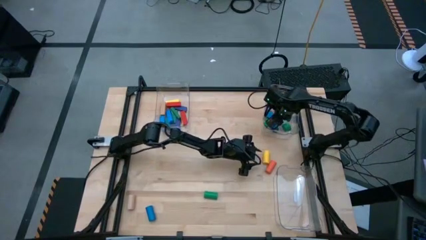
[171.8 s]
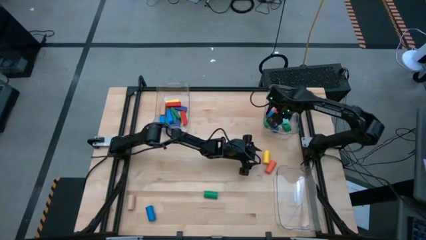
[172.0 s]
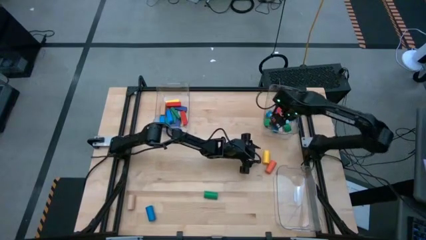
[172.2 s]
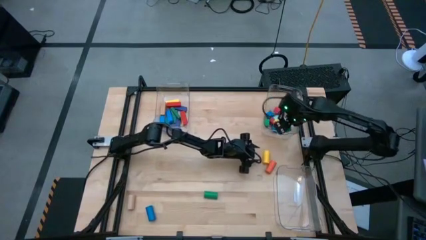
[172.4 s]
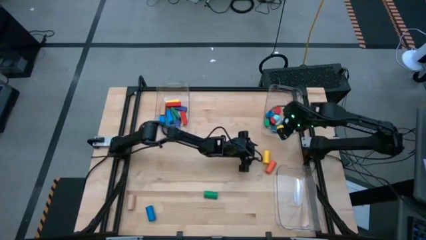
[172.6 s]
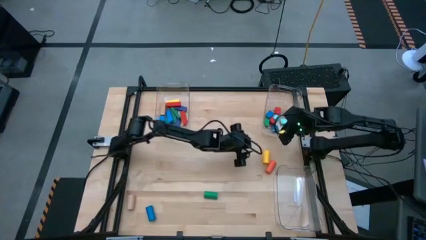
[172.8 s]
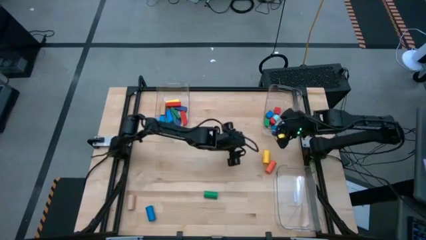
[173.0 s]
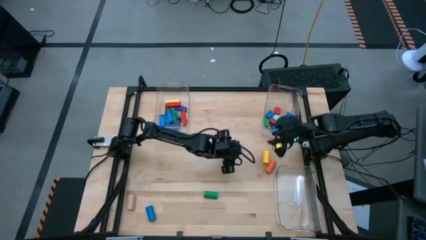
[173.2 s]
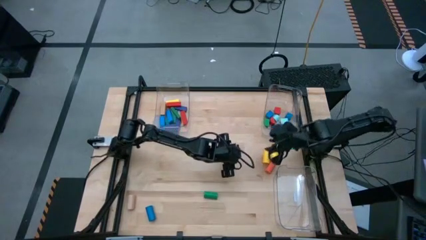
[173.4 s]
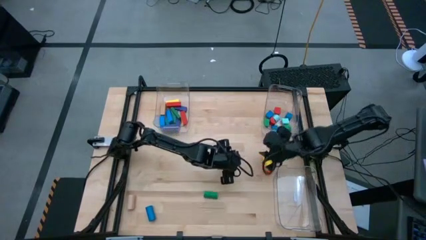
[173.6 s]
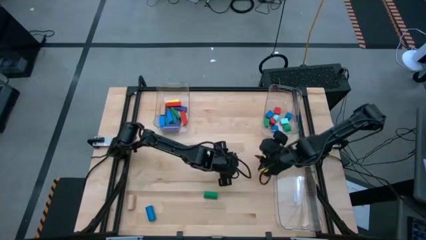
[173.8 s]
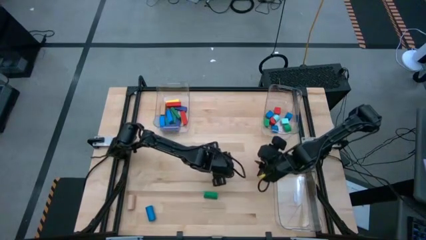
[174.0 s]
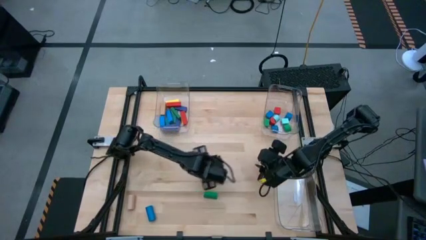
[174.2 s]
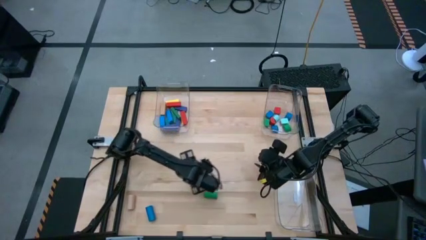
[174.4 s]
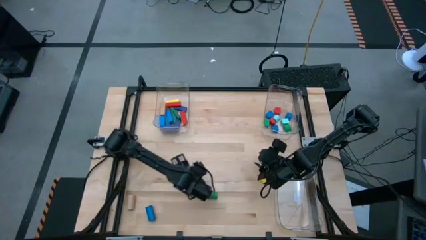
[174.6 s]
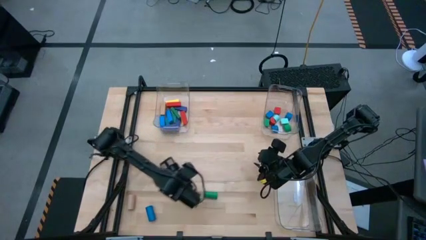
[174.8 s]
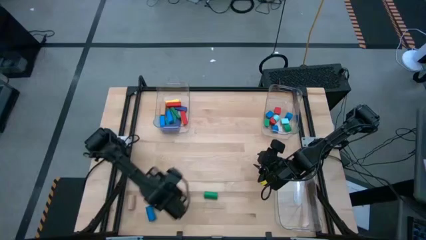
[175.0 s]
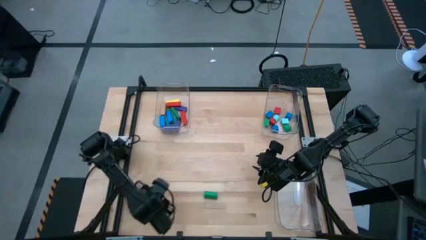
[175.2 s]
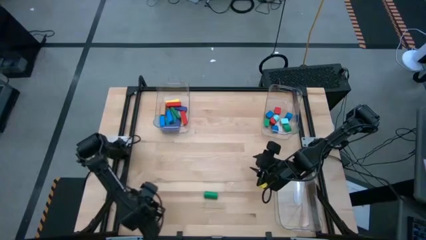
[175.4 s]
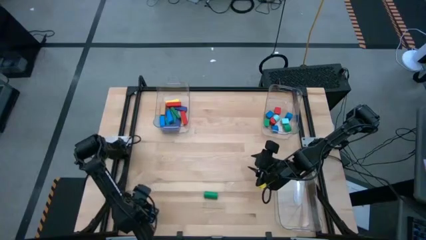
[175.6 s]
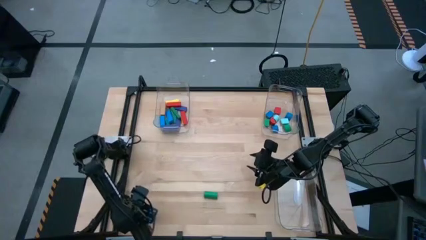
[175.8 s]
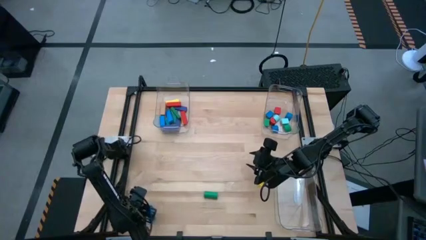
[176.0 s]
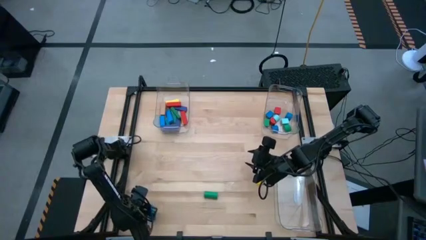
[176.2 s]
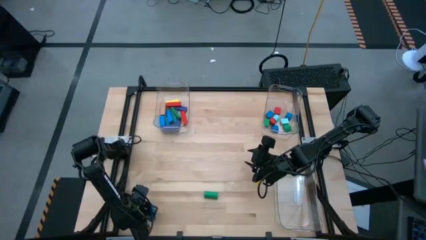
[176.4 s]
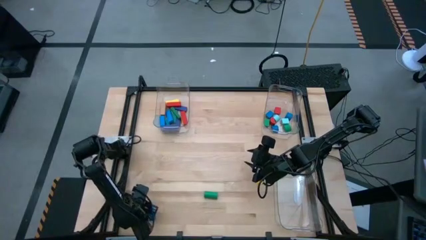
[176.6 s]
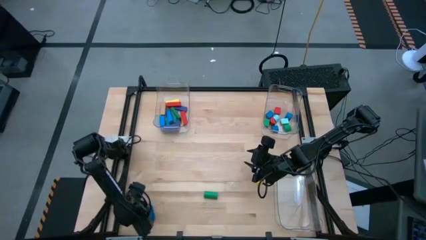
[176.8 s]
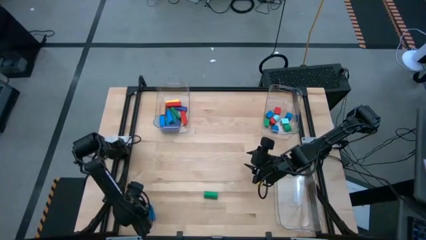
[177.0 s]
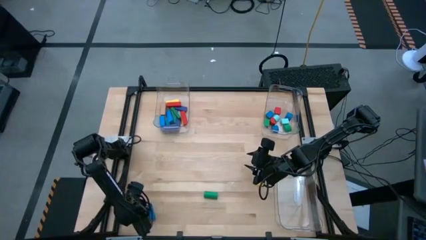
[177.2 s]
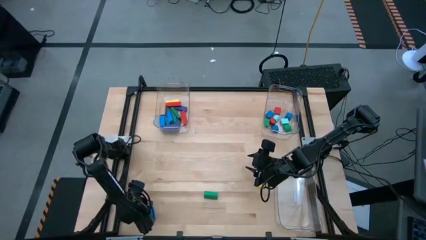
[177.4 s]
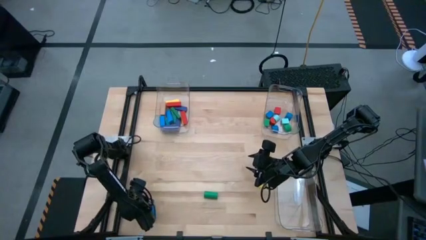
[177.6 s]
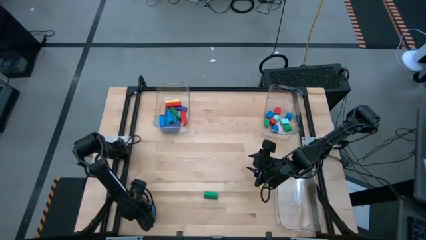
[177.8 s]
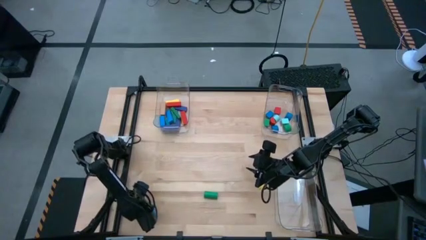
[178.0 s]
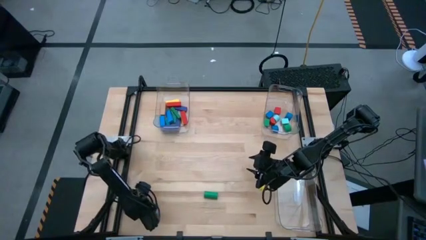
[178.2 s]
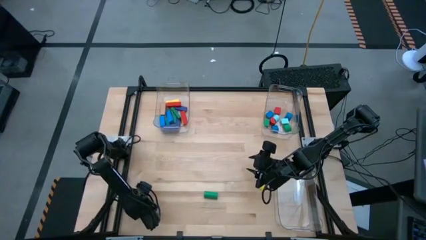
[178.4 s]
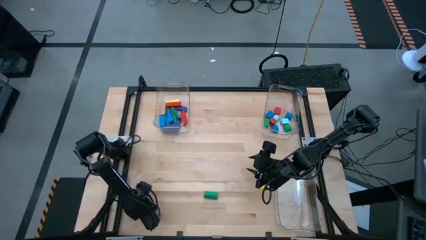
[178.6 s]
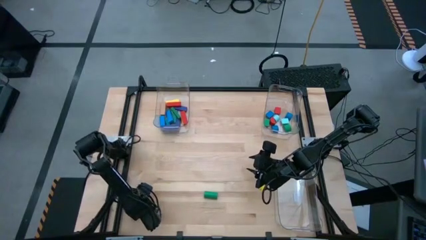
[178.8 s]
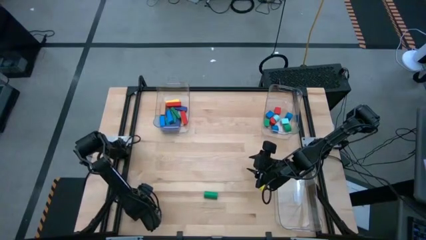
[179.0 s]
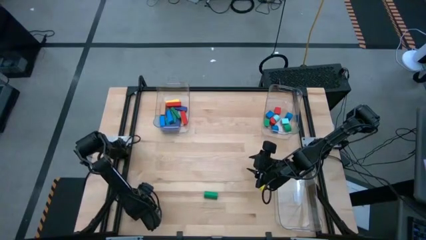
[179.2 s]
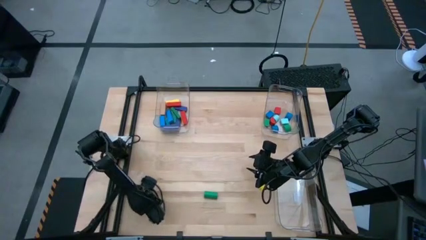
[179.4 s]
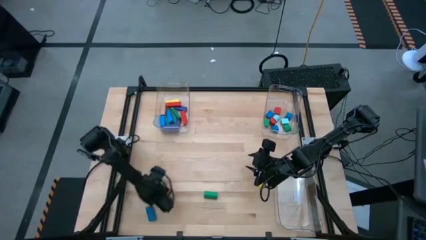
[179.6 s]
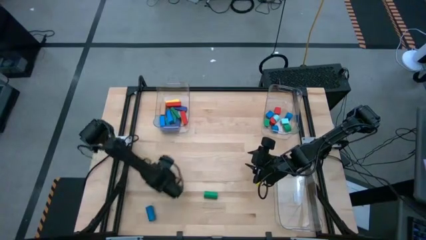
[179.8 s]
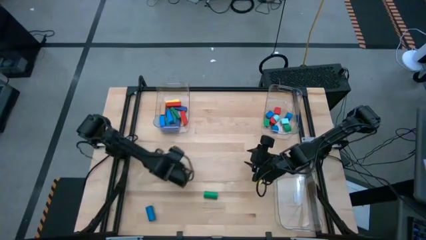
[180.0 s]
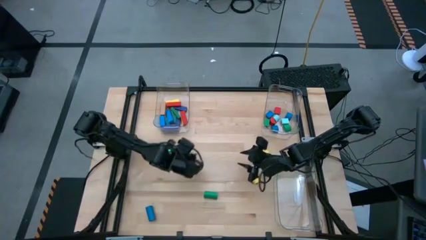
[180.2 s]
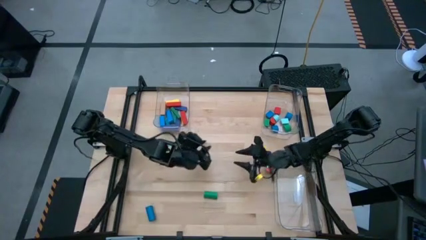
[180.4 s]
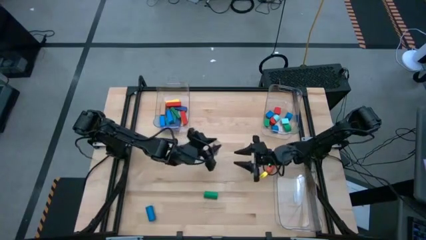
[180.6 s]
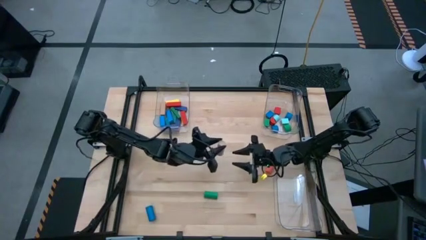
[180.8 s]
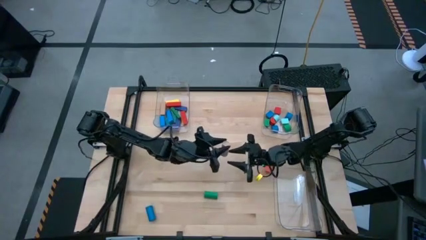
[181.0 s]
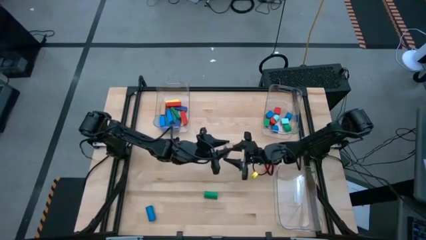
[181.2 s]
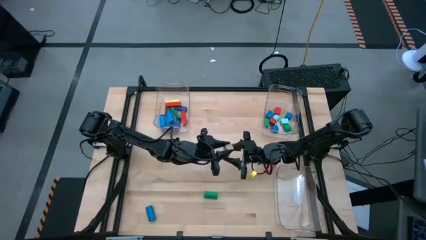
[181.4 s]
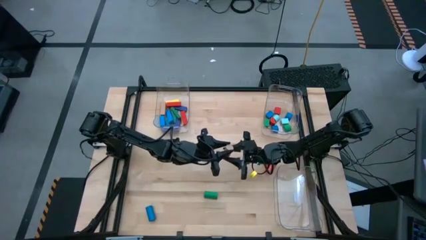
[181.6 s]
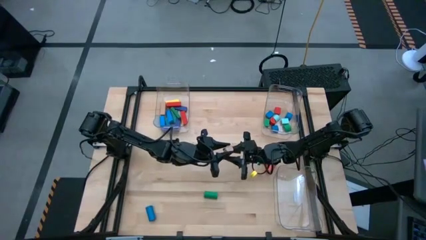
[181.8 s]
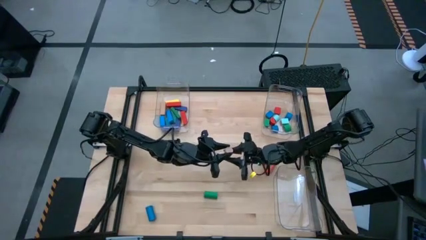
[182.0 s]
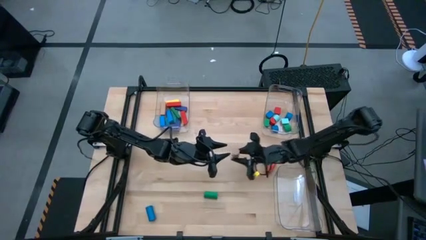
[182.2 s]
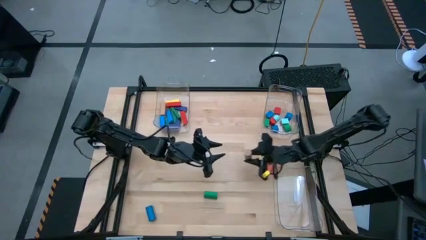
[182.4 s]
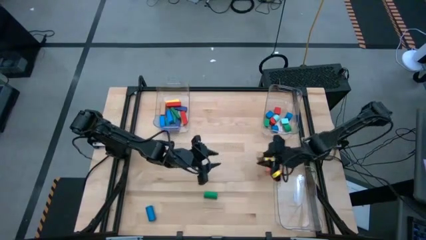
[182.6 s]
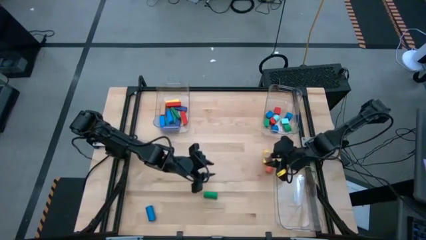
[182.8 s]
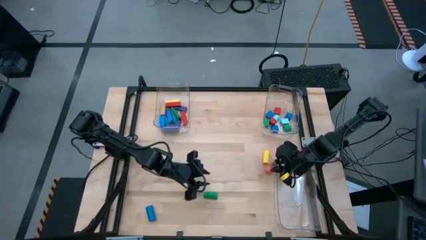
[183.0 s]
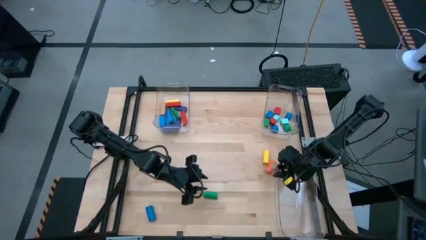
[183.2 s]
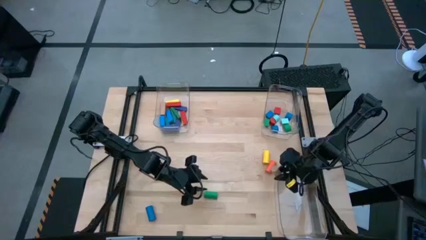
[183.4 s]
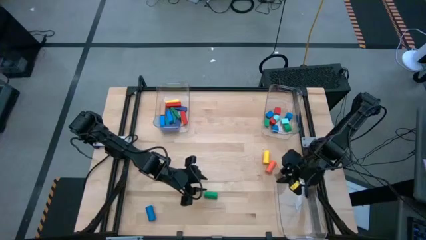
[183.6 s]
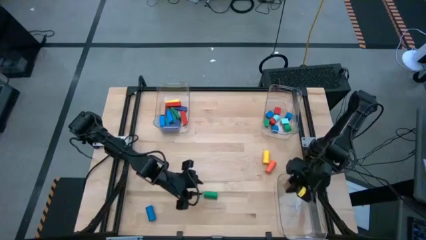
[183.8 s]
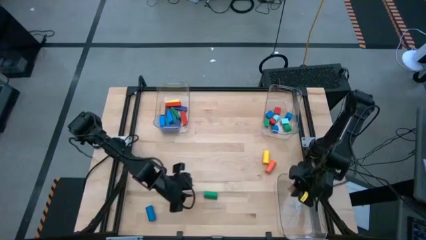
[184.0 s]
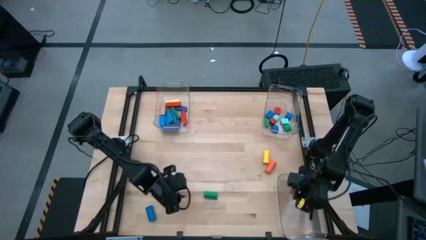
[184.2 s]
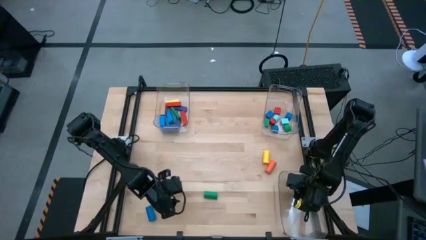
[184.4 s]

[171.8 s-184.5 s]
Task: Sort blocks by size
Put the brown cylindrical block into the bottom transparent bin
